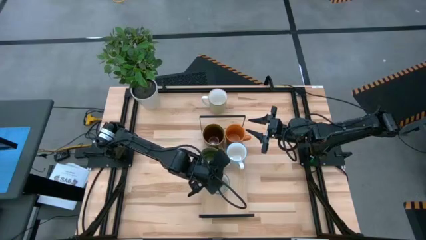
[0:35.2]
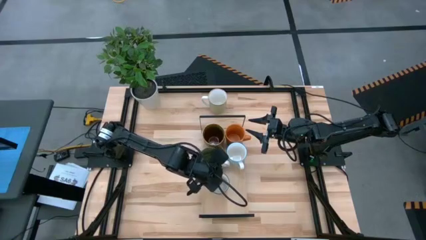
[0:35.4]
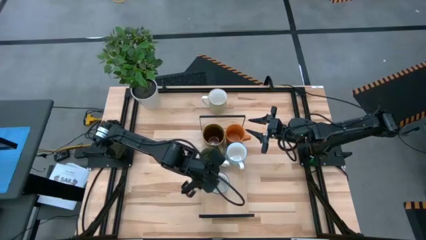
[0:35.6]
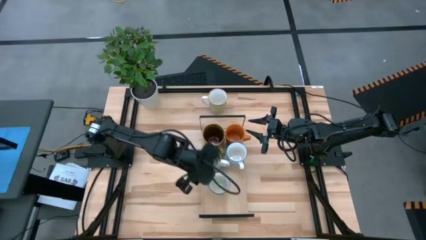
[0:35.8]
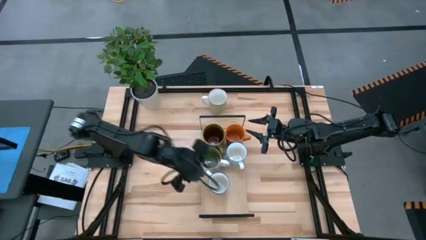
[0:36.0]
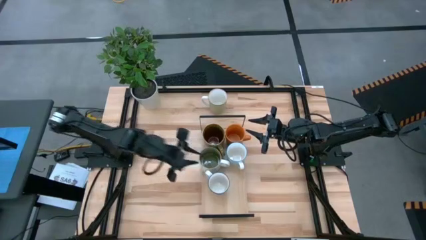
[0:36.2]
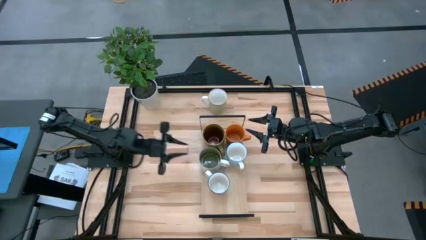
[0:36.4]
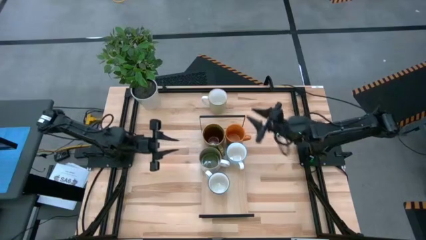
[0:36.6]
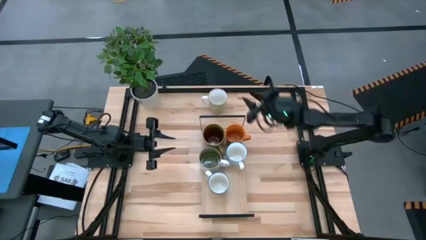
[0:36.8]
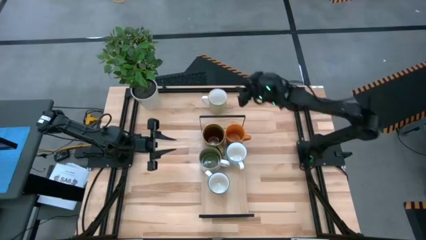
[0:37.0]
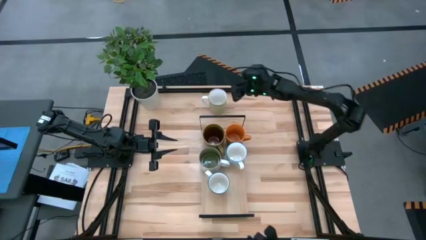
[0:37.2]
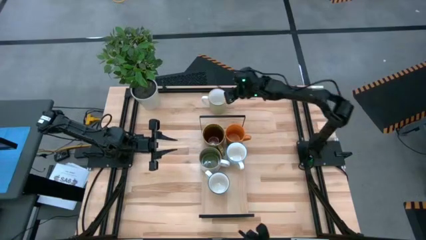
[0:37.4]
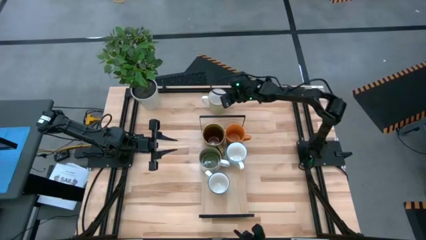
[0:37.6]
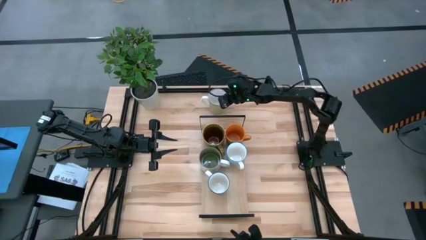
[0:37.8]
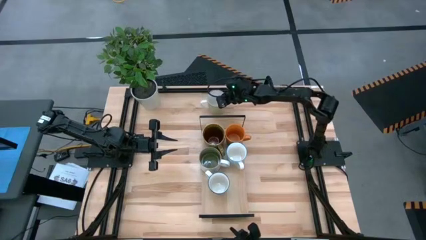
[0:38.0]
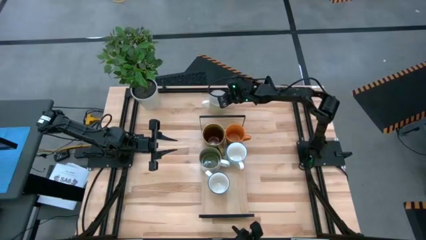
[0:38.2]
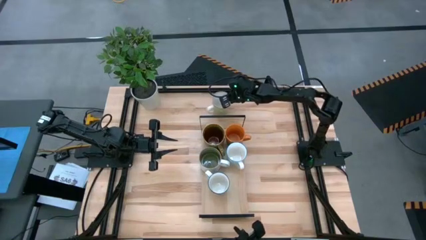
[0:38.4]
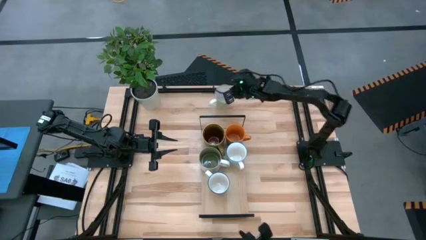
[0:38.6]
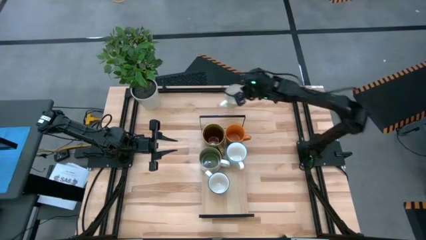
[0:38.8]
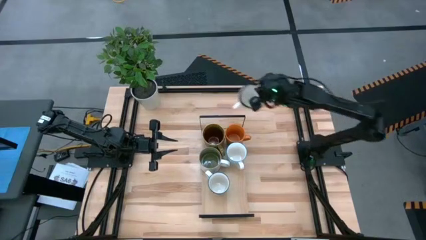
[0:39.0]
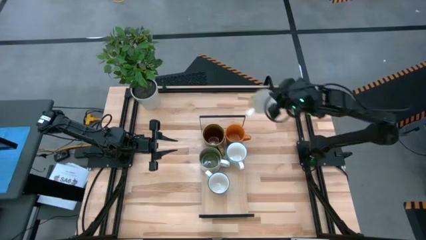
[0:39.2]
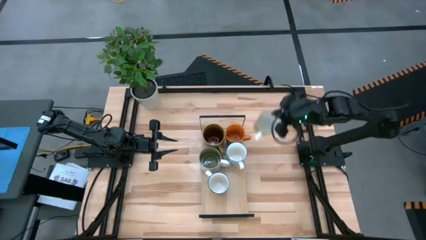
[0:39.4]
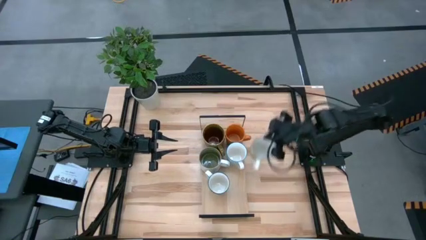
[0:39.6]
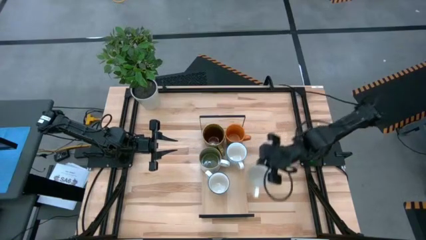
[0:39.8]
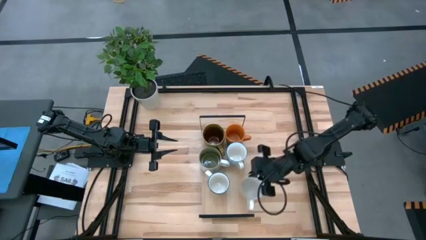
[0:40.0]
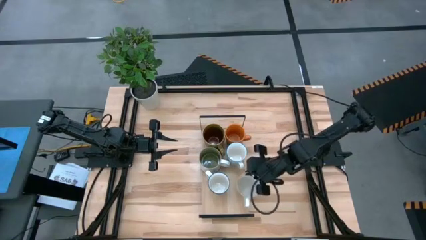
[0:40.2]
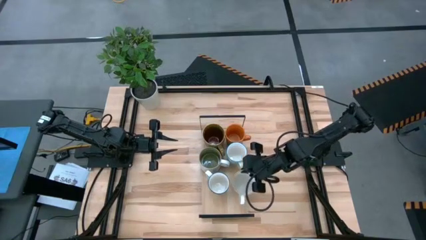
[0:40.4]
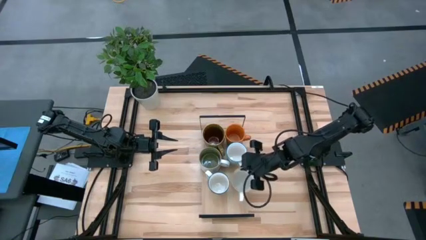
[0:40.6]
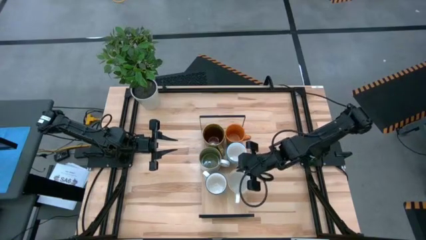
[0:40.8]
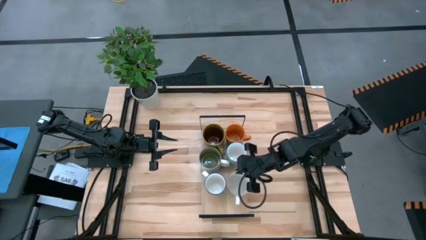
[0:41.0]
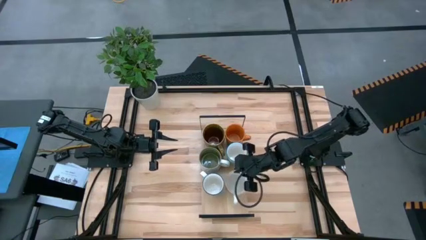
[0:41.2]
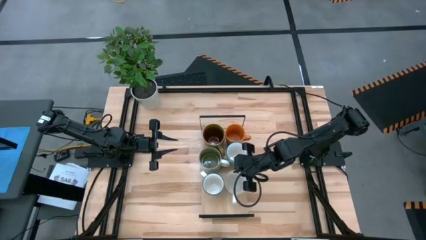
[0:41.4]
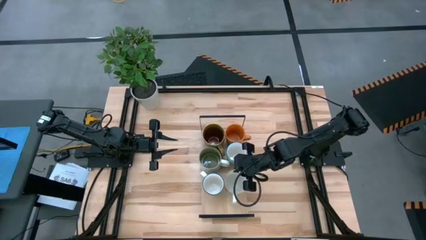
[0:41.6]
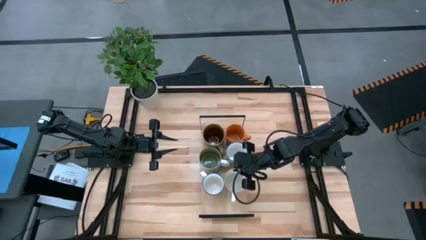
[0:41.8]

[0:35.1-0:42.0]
Task: Place coffee mugs
Put the light green mug on the shelf

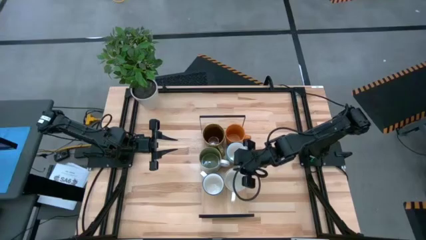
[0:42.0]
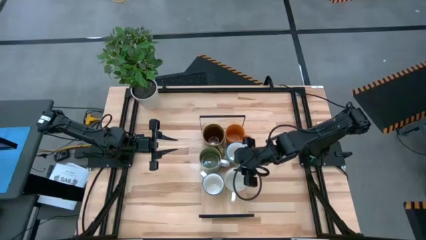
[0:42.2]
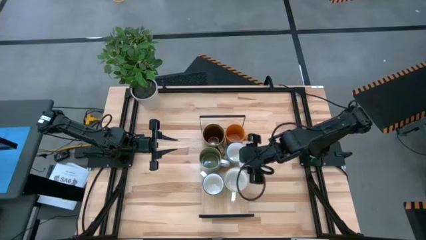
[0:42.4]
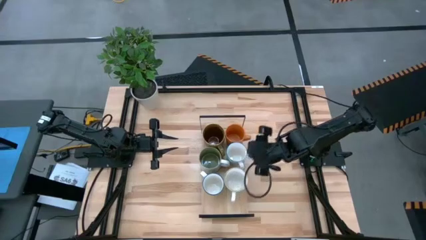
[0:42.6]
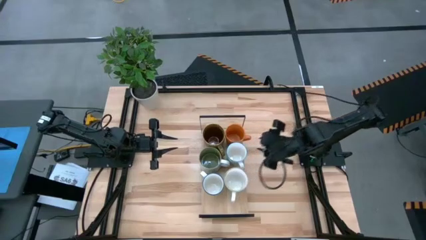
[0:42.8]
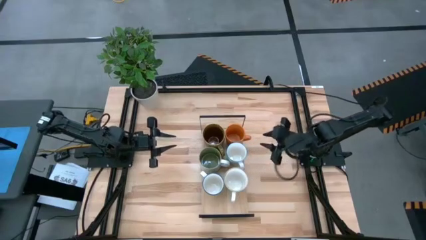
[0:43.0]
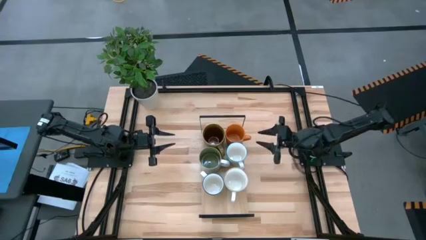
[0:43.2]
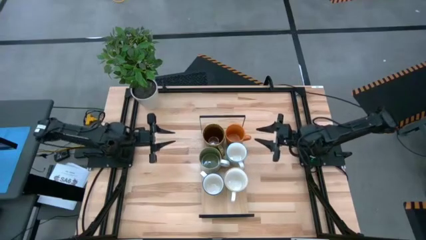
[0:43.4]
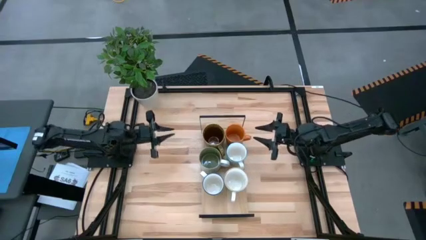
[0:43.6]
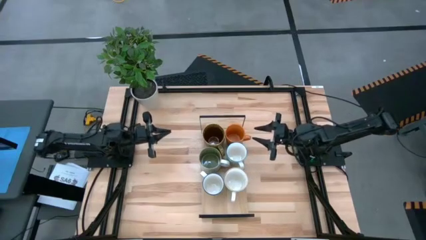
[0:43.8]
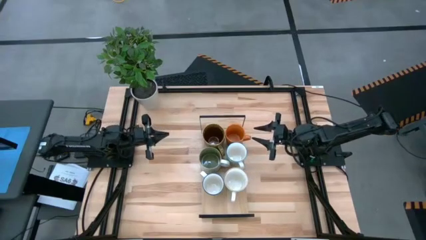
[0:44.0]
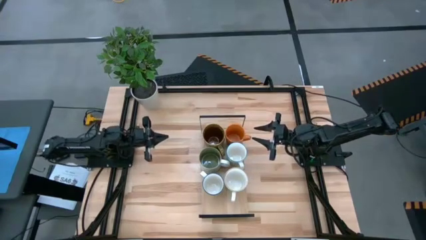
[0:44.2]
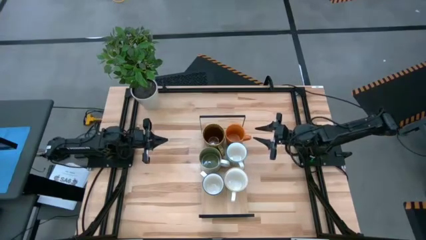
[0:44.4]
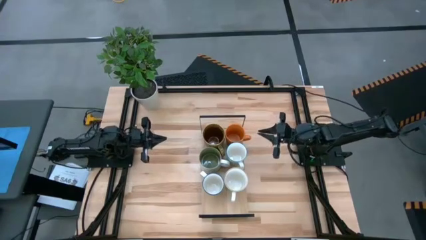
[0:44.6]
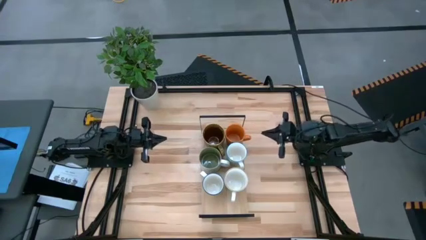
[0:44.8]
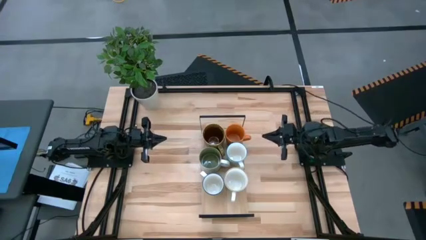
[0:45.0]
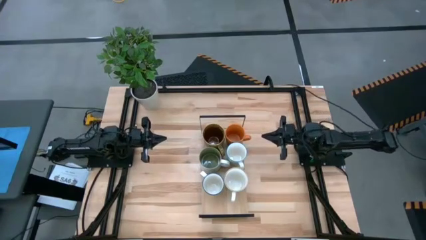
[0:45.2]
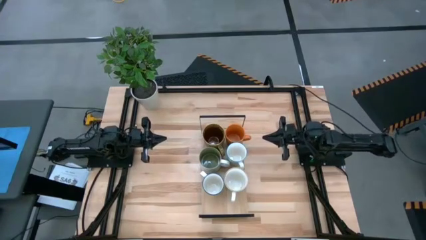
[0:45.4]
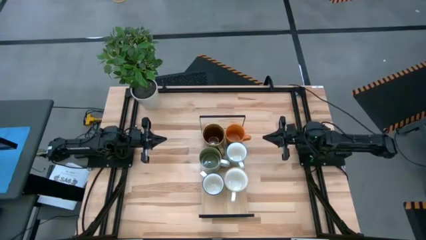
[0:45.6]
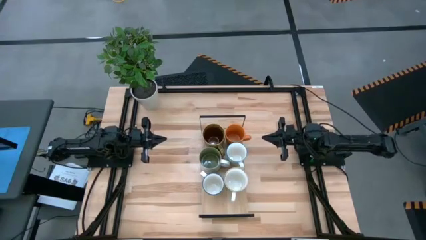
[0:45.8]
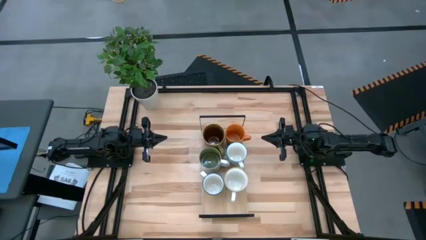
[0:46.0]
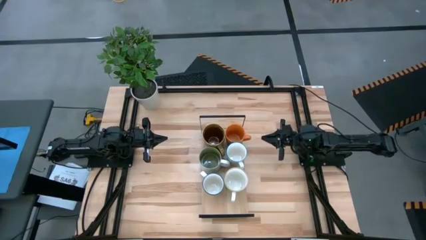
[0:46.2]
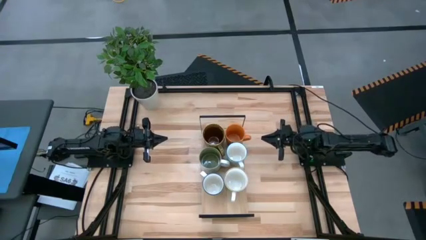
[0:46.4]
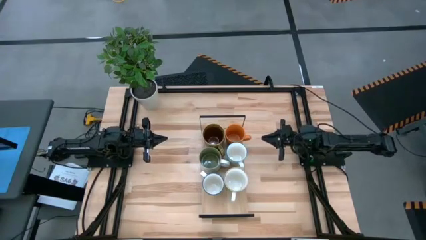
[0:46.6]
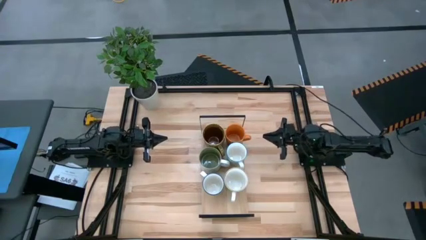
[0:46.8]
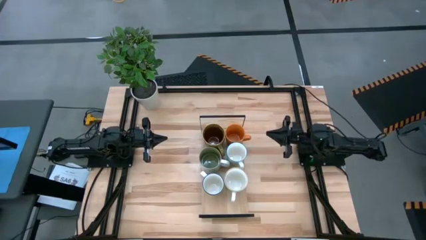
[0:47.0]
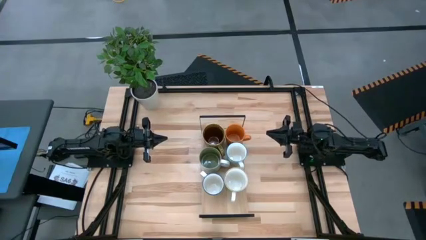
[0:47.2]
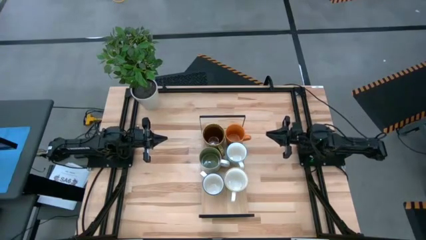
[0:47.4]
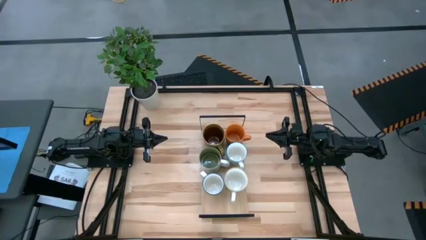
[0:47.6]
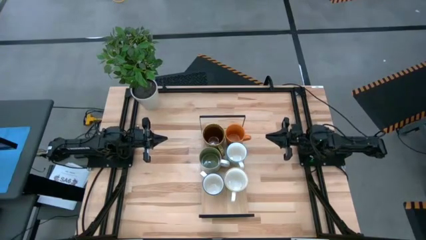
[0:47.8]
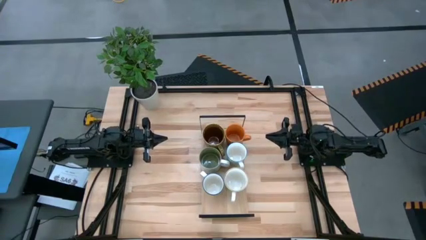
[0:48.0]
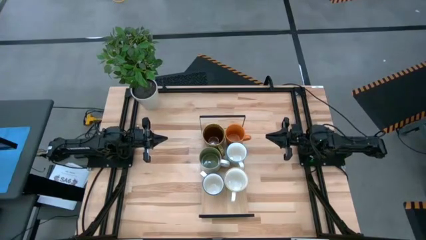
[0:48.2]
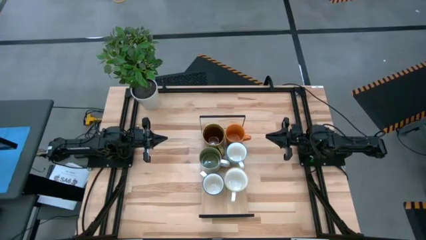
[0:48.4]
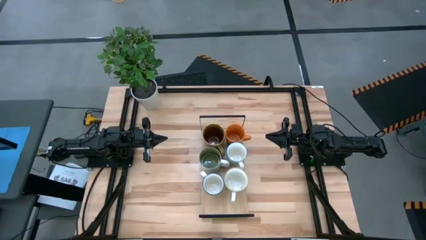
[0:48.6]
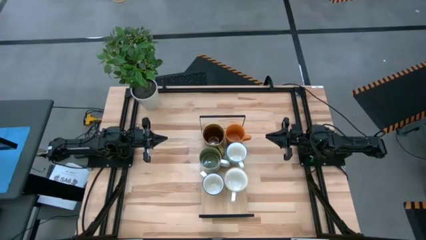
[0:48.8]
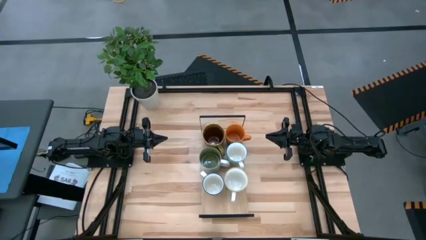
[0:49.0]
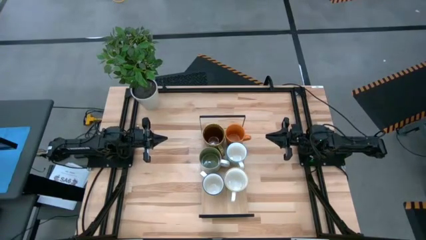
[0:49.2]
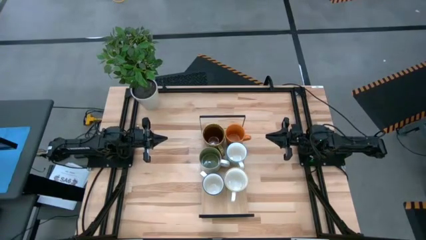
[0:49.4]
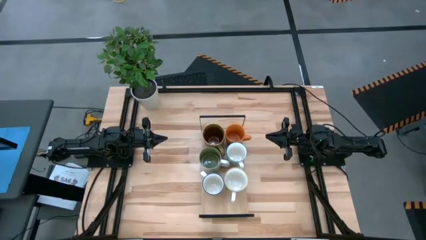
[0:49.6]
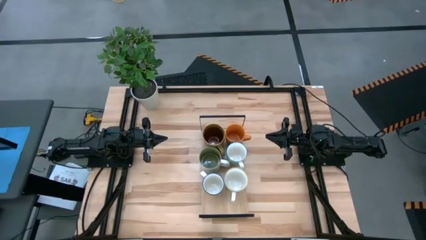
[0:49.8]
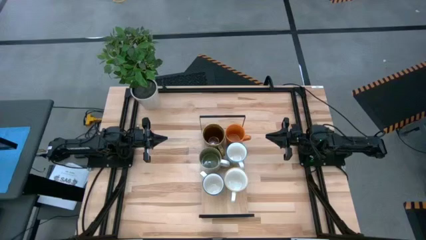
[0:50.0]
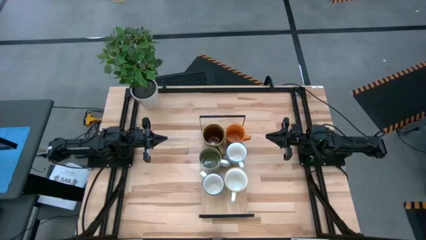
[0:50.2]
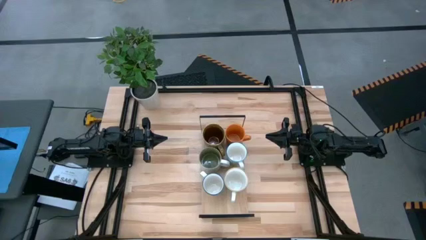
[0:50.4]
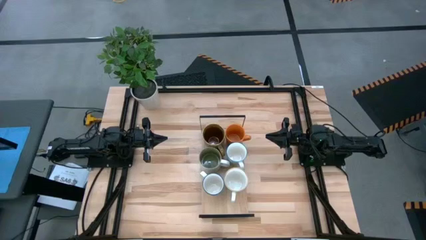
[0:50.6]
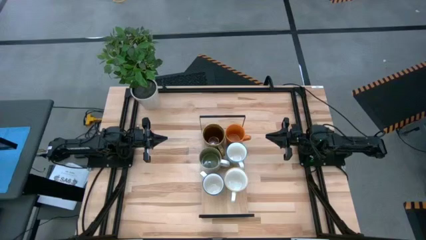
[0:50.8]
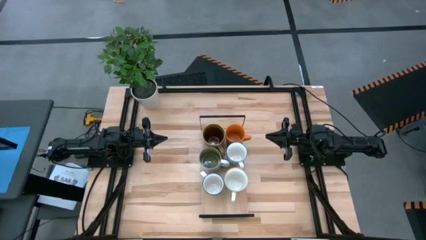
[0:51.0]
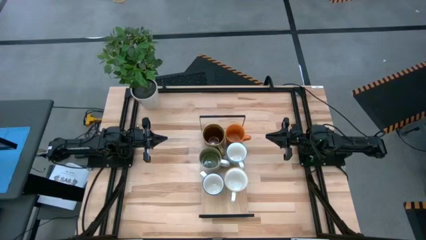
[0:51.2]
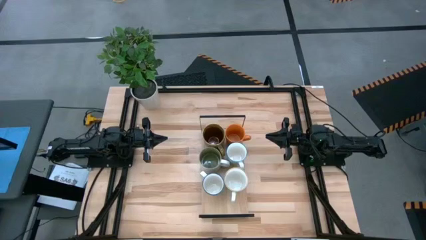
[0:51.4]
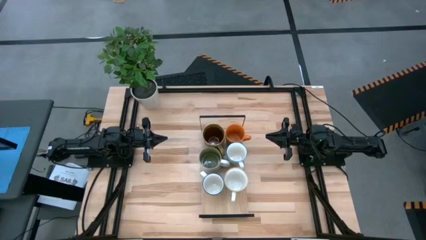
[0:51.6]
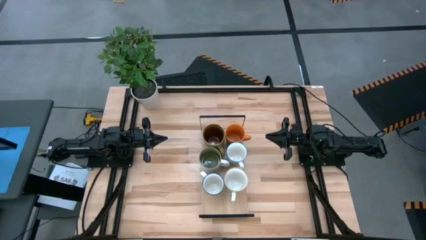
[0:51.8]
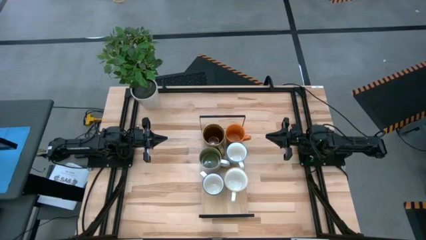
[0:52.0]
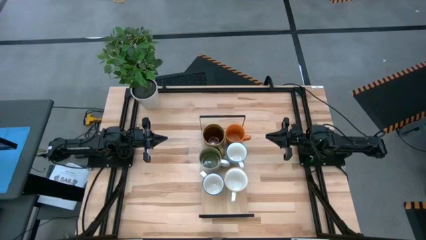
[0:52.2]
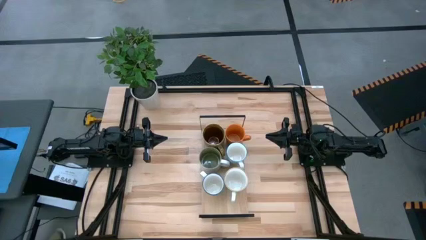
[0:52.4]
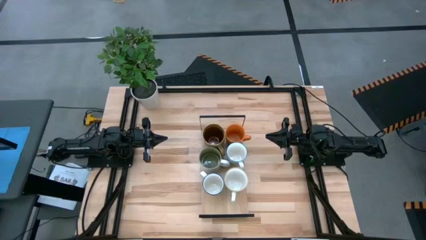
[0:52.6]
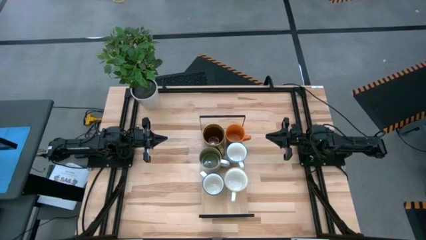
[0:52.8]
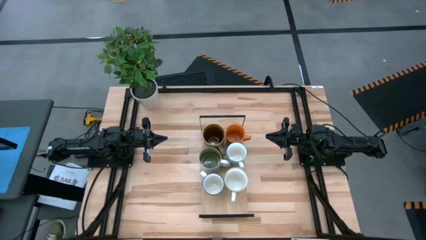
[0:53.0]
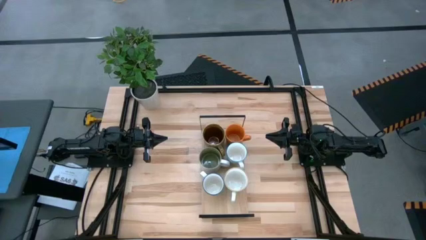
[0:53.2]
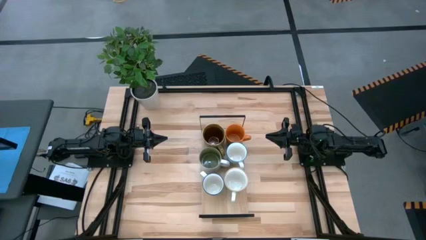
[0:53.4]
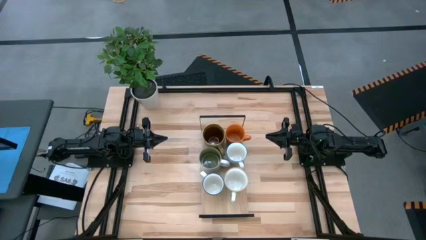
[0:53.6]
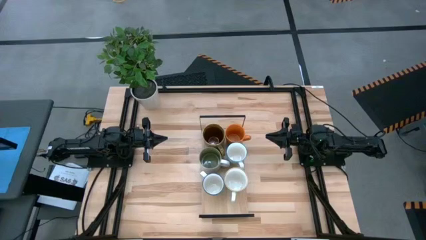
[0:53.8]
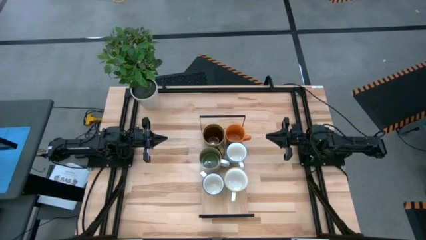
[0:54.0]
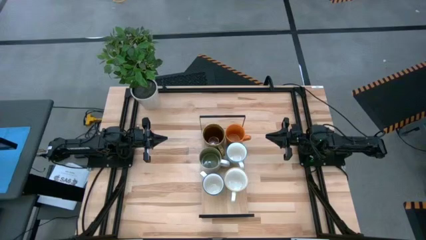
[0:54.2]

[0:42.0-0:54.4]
Return to Home Position
